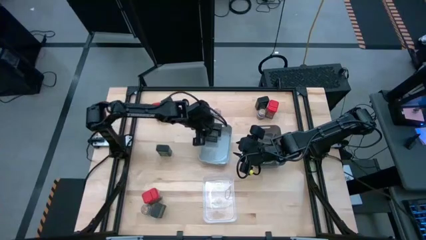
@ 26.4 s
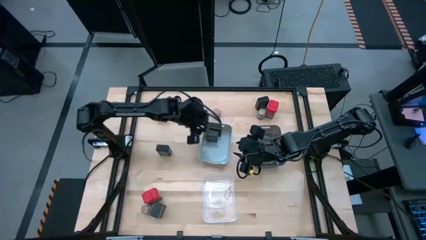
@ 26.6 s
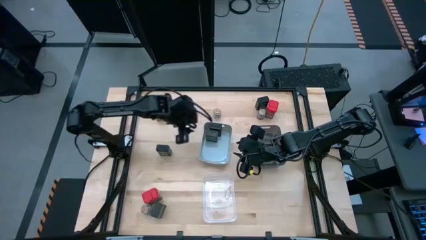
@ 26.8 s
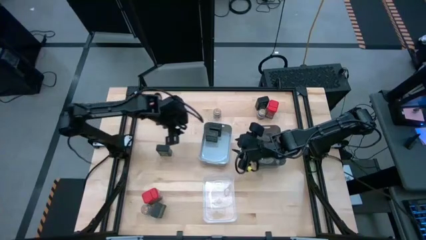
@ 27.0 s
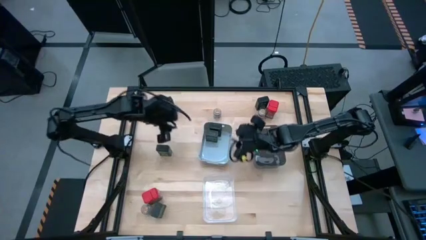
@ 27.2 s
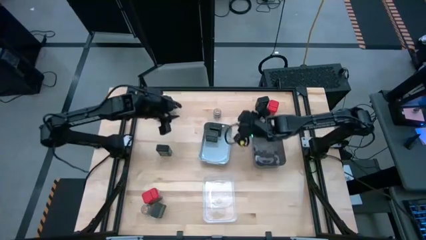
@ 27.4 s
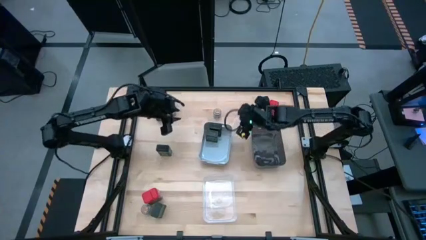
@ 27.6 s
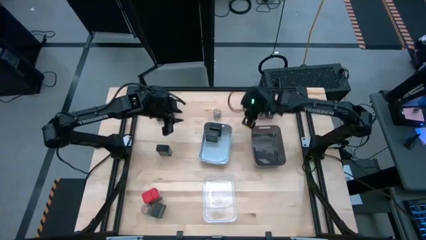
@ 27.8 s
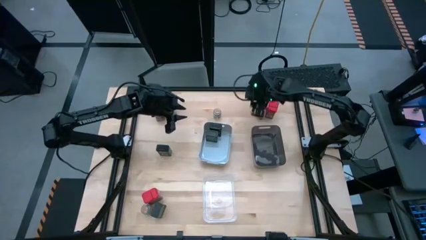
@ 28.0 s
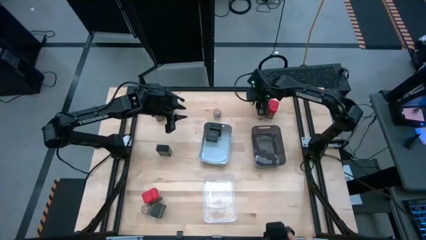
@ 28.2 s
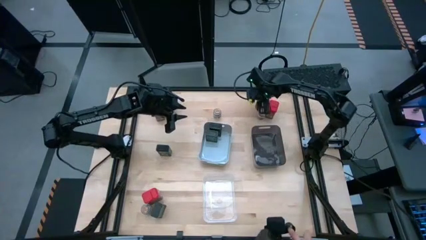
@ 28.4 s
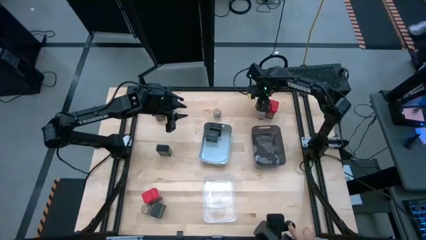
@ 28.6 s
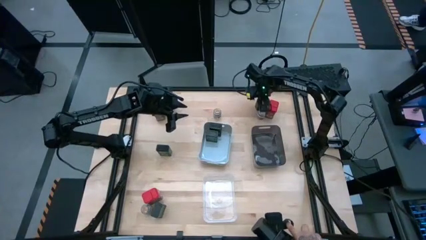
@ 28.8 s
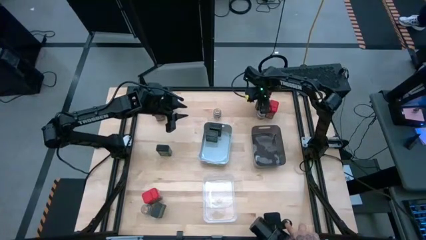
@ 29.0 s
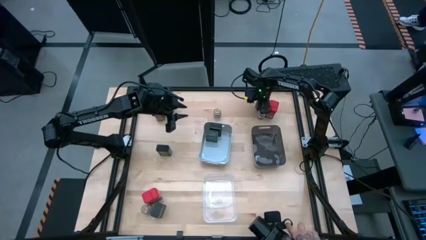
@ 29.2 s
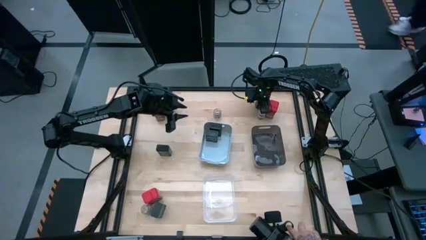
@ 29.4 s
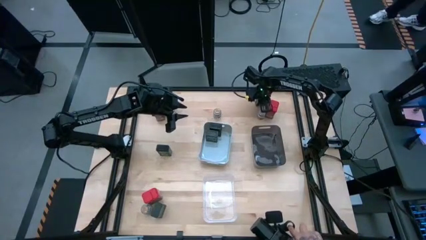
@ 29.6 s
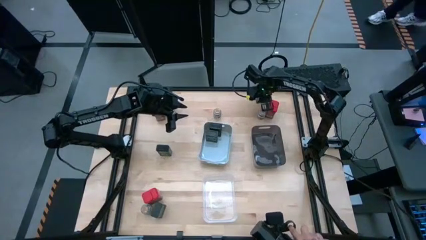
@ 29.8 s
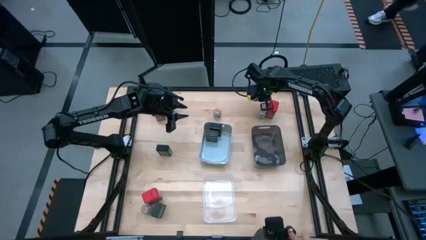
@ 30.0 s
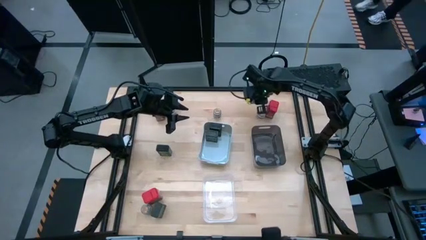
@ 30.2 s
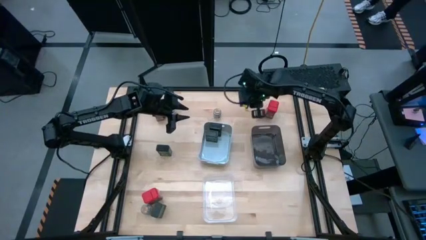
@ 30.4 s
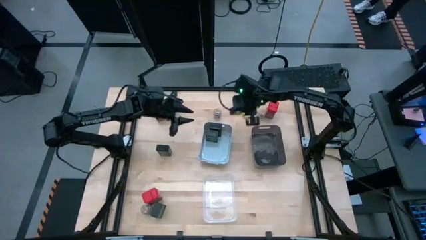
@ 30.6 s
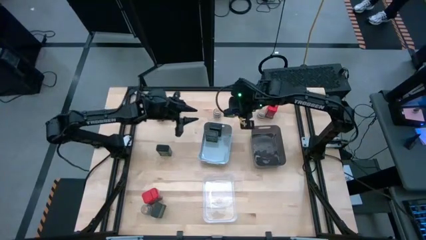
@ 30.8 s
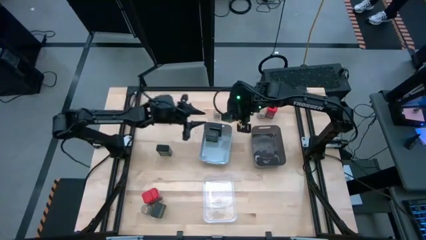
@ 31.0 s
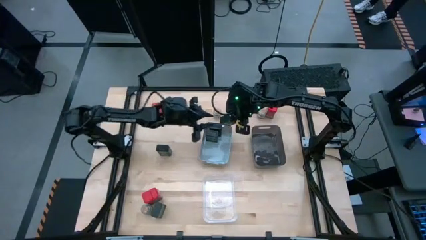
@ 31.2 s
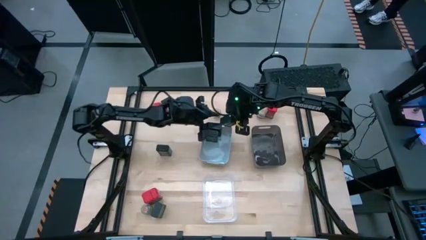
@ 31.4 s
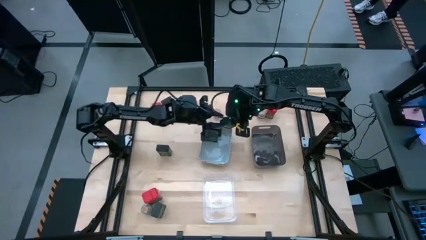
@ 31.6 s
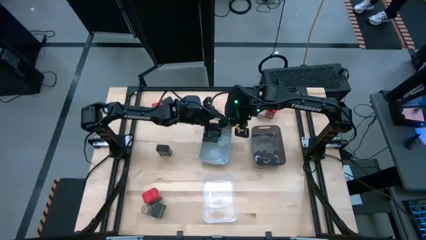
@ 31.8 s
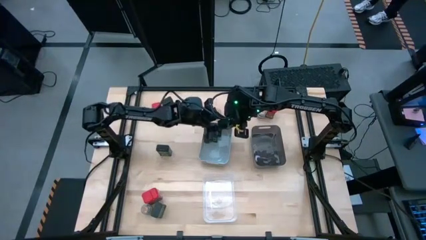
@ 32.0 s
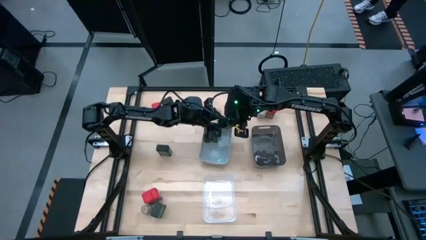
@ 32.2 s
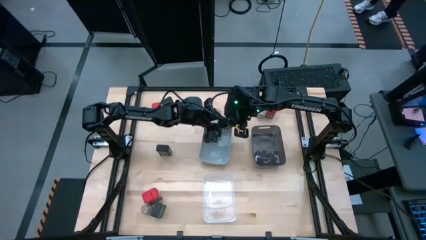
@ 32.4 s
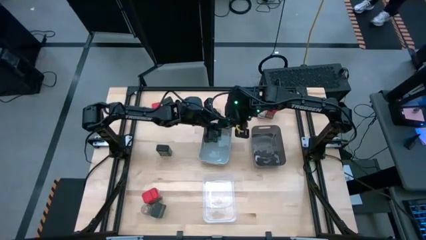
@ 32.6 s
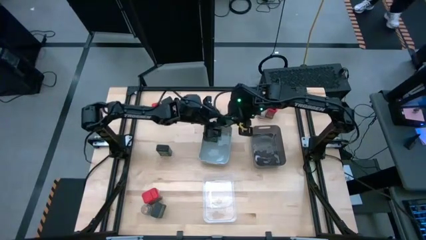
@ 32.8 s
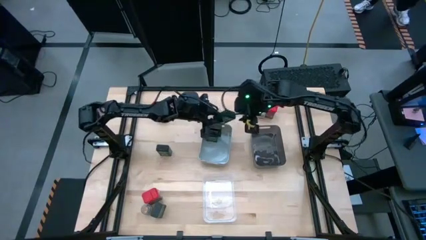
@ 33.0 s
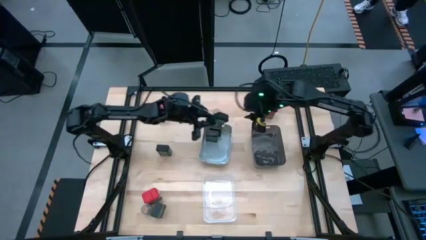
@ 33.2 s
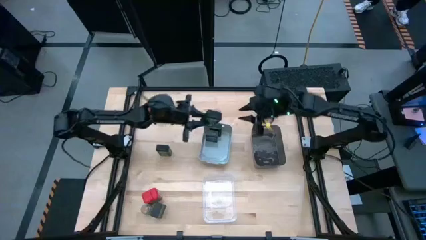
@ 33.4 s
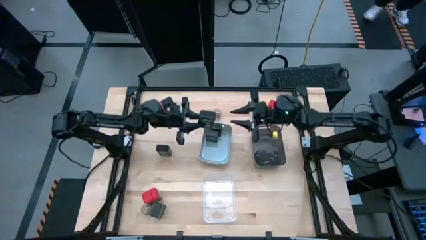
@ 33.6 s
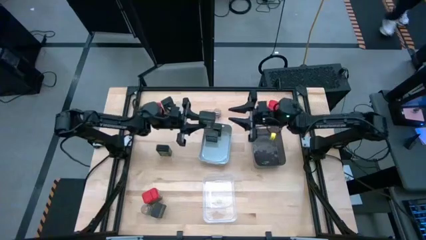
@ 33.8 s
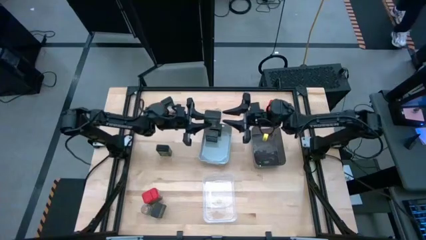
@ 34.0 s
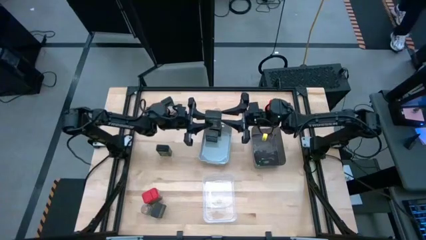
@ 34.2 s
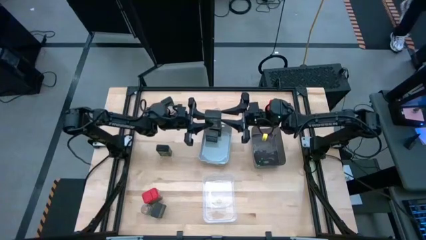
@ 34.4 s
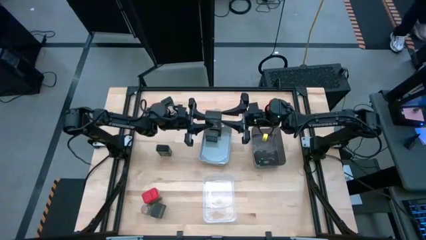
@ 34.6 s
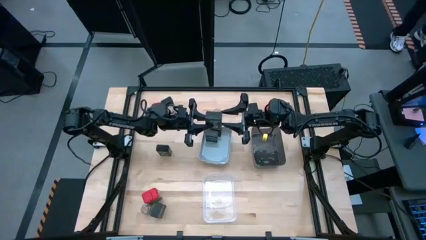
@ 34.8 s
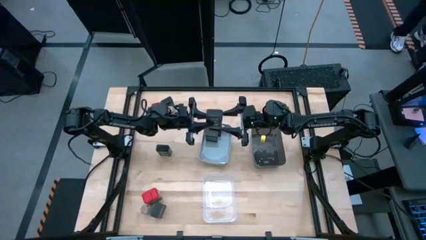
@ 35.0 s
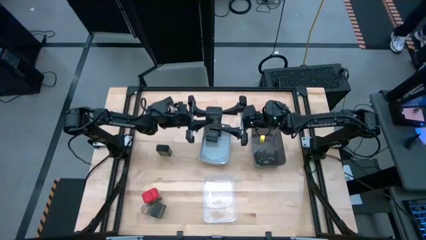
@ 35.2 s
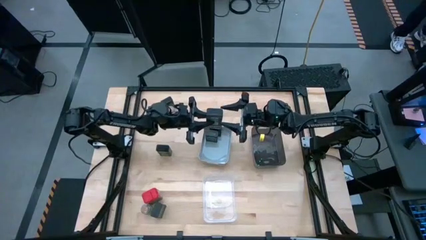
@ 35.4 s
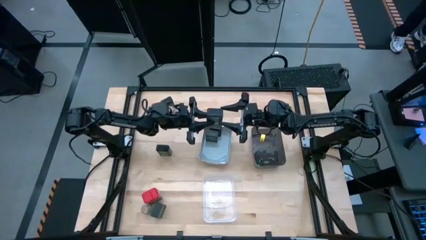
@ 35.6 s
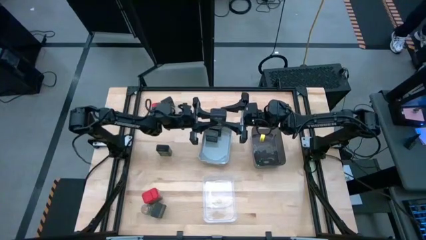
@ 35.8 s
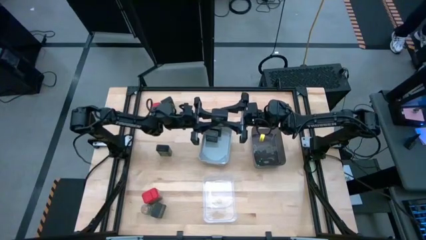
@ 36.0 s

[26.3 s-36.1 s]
Task: Sort spices by type
Put the black spice can into the gray bin

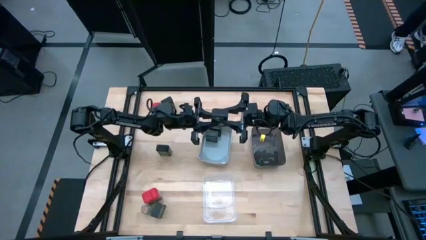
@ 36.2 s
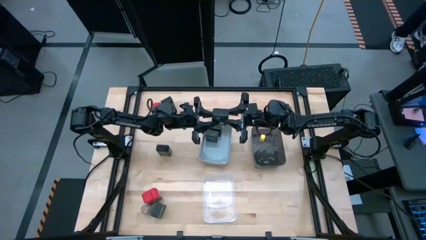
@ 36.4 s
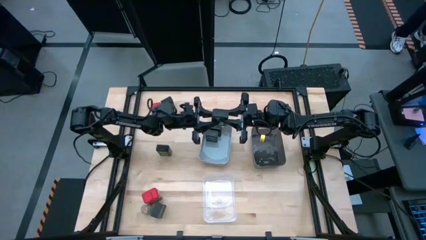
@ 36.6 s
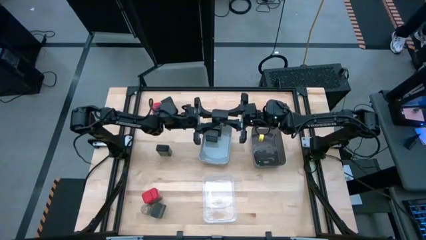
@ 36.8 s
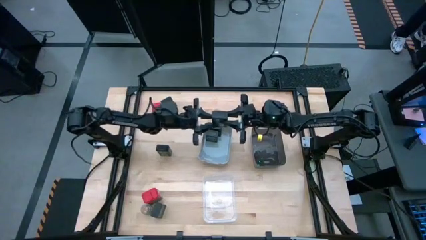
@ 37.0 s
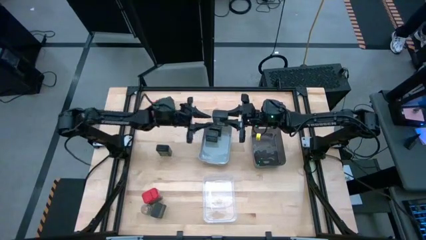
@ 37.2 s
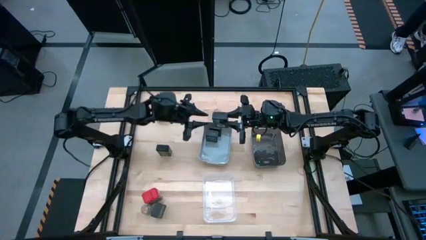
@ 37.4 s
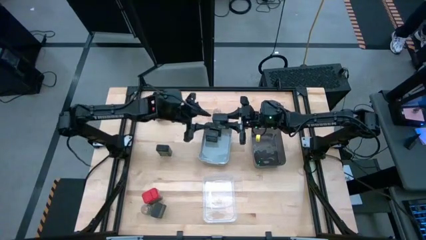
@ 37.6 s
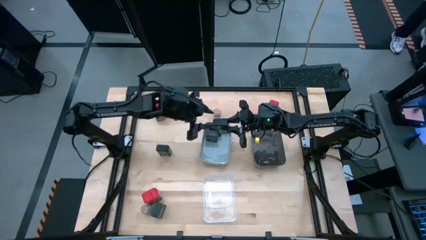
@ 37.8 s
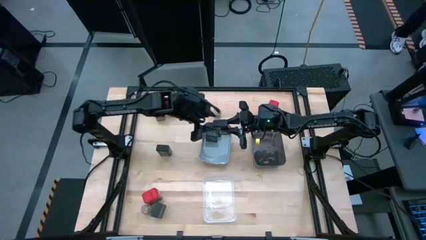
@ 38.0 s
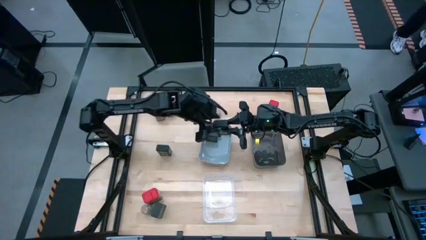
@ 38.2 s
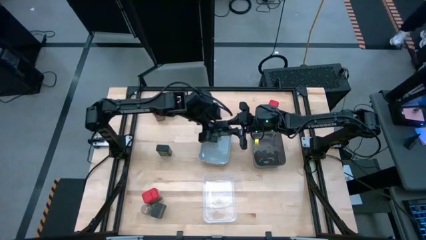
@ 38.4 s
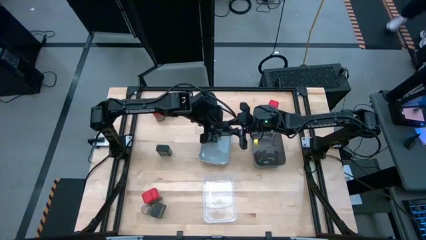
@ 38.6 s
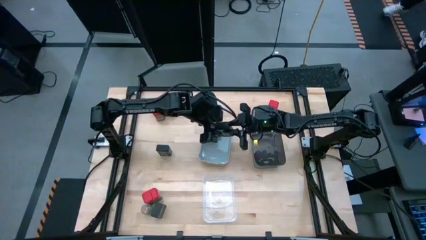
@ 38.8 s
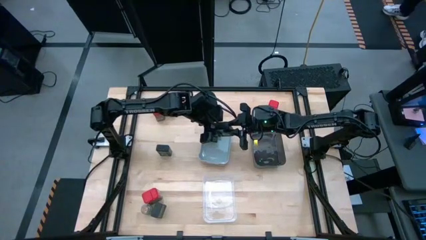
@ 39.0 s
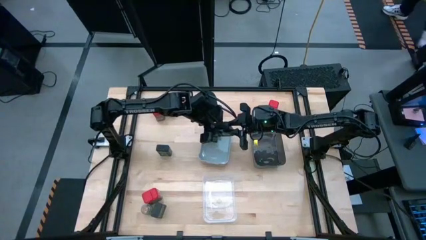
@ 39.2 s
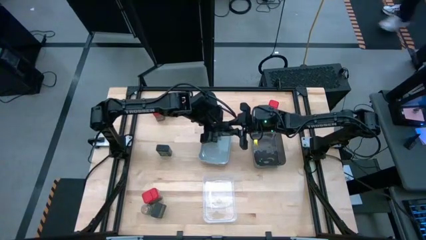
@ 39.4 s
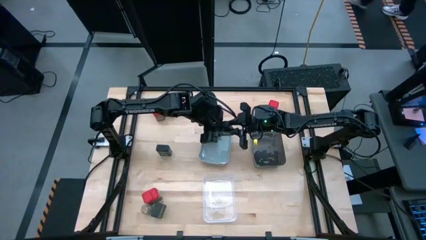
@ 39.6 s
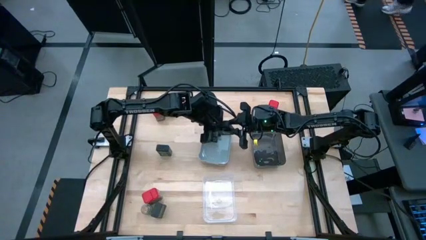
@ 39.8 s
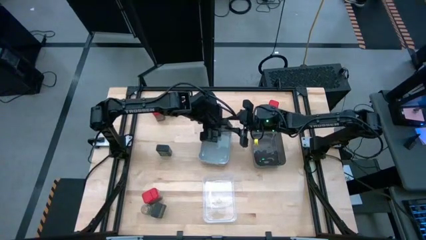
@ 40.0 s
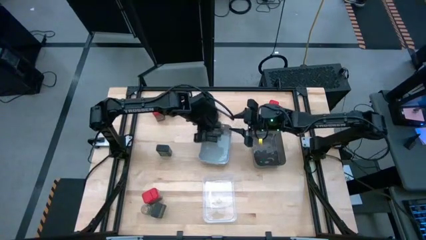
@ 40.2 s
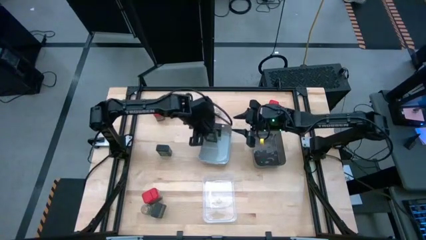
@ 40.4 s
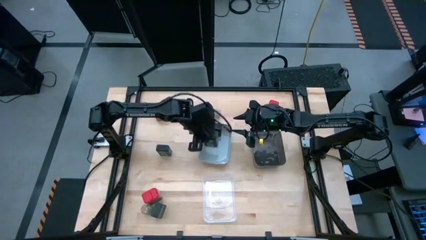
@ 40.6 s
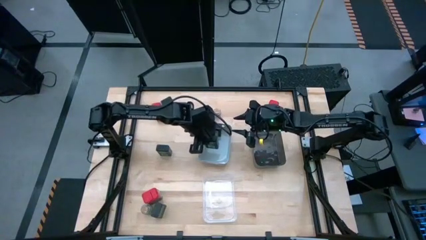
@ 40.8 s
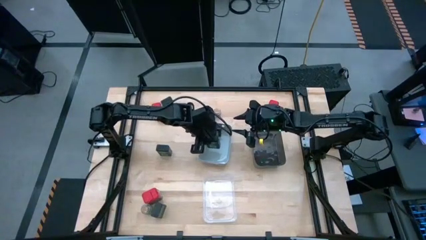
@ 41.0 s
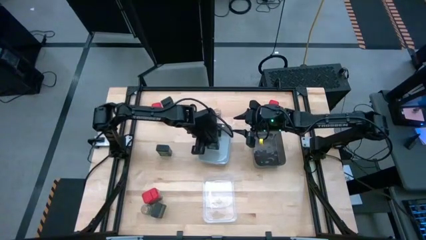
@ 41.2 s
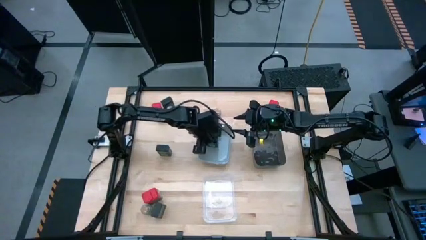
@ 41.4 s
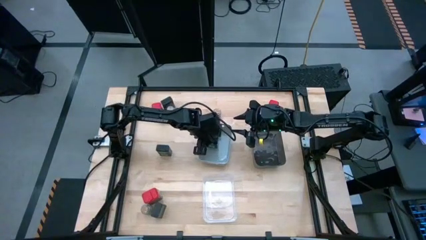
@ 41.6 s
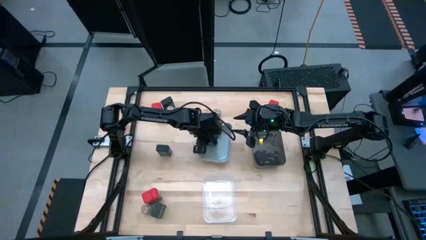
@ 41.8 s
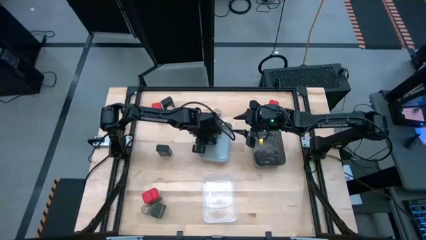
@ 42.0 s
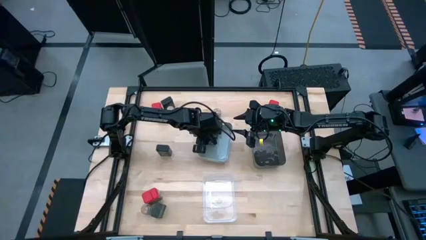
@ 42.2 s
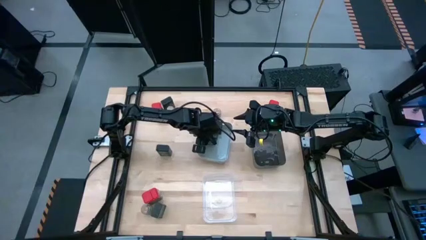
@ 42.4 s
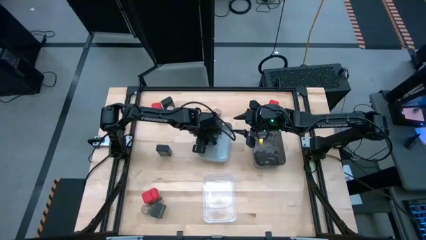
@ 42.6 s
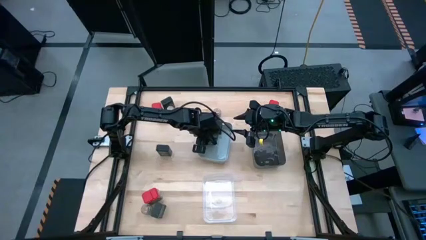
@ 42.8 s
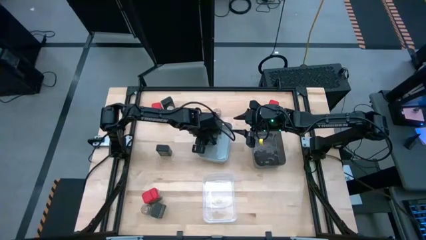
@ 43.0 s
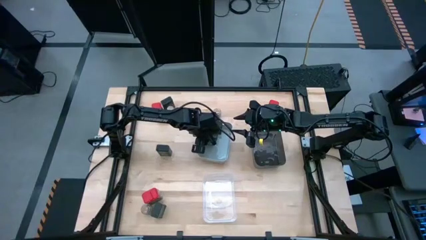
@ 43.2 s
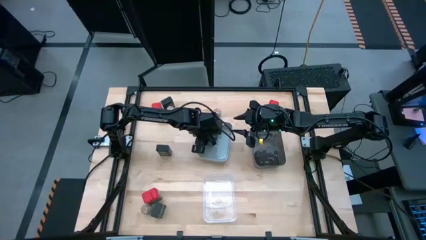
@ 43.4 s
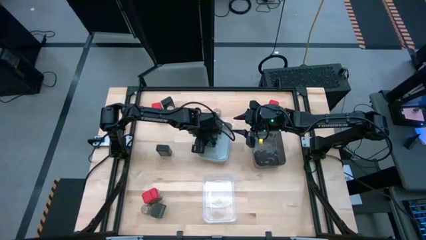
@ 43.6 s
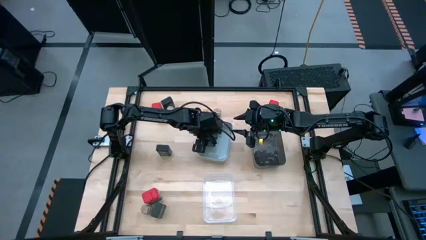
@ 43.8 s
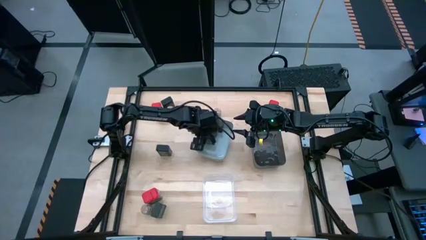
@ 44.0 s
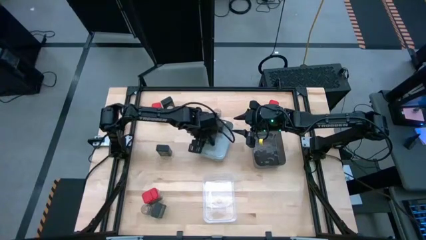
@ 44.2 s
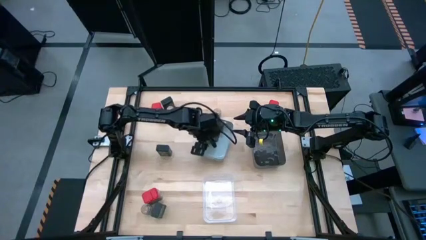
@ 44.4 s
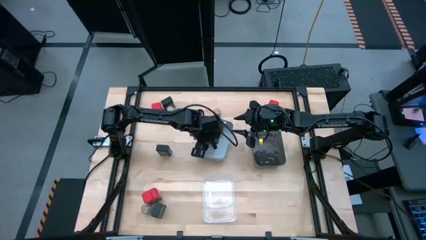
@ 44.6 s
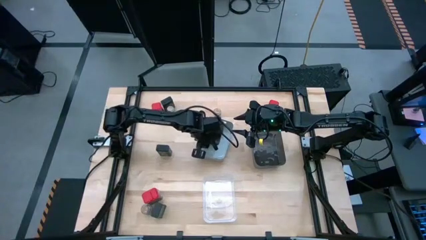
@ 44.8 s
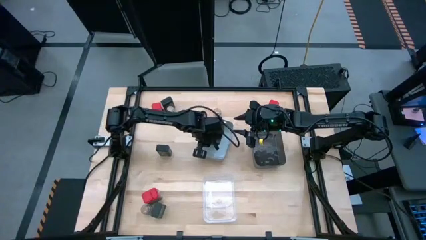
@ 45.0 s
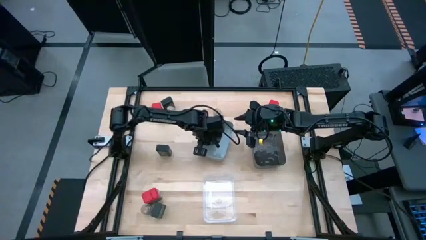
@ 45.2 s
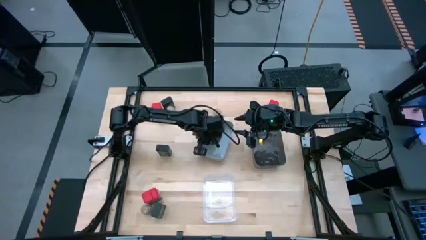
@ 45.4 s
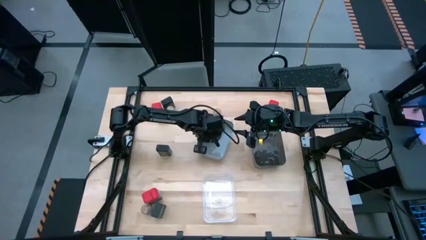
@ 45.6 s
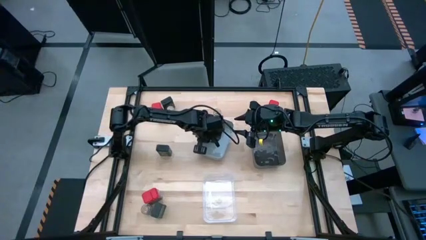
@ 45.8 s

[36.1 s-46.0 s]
Put the black spice can into the gray bin
